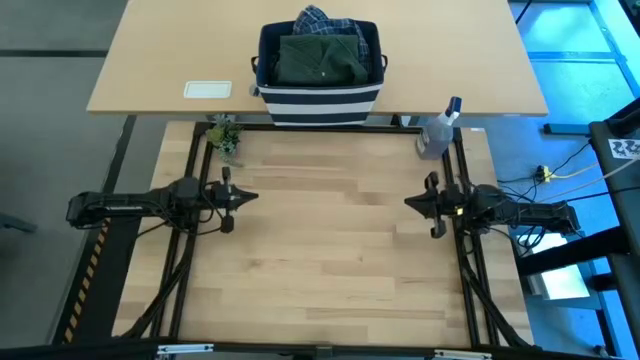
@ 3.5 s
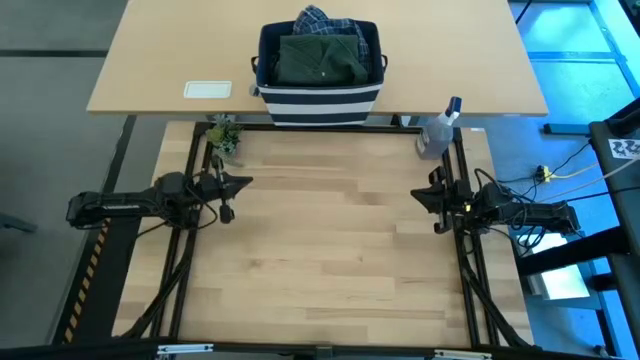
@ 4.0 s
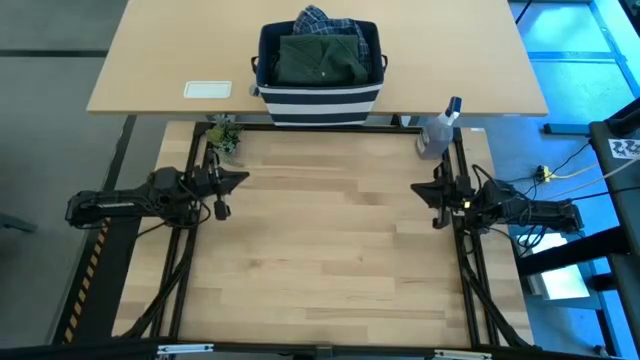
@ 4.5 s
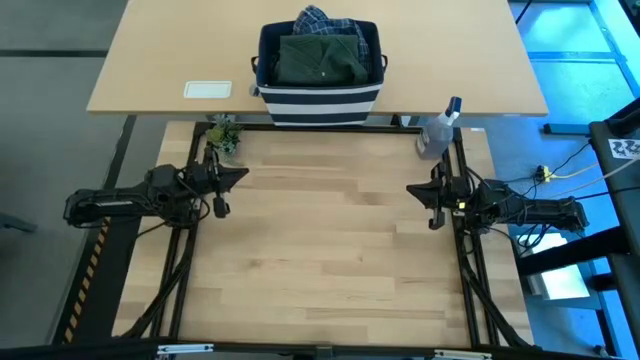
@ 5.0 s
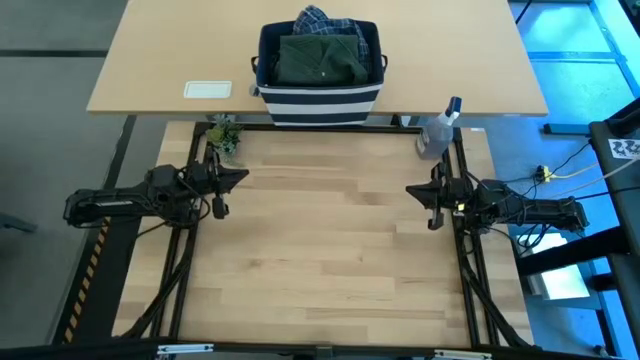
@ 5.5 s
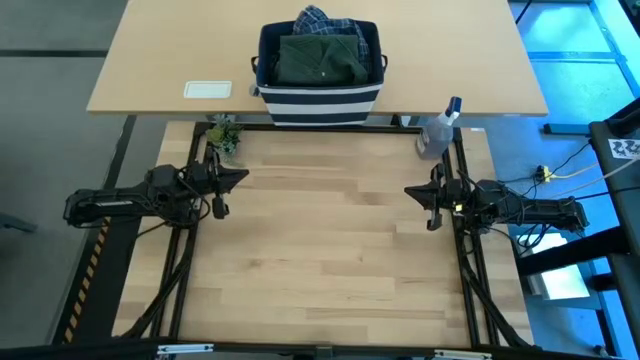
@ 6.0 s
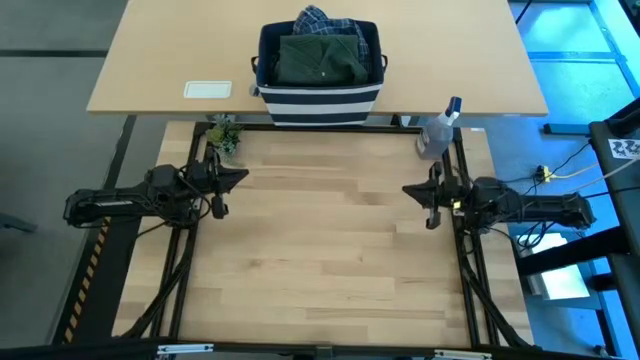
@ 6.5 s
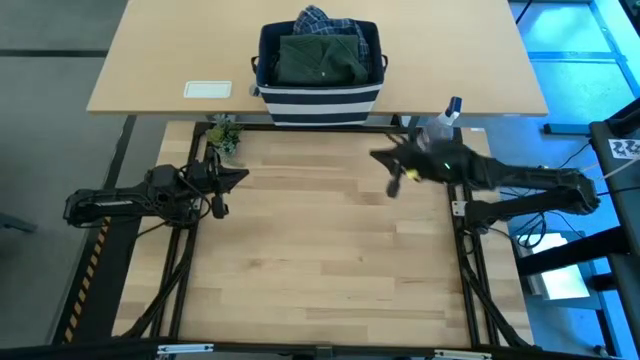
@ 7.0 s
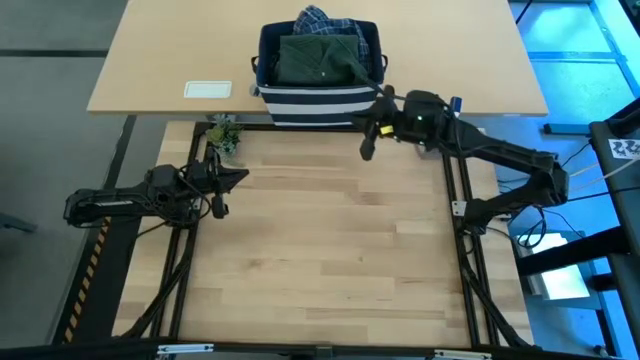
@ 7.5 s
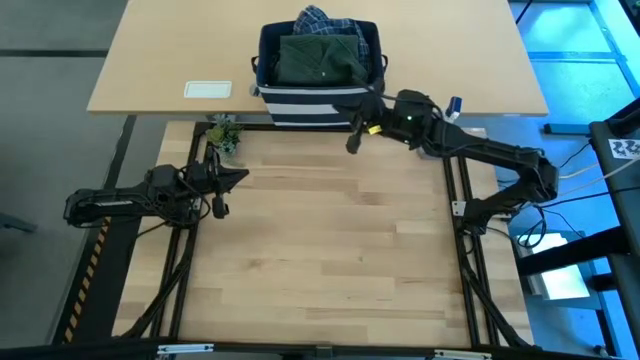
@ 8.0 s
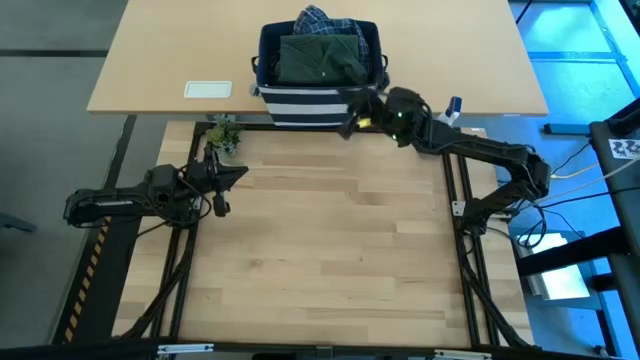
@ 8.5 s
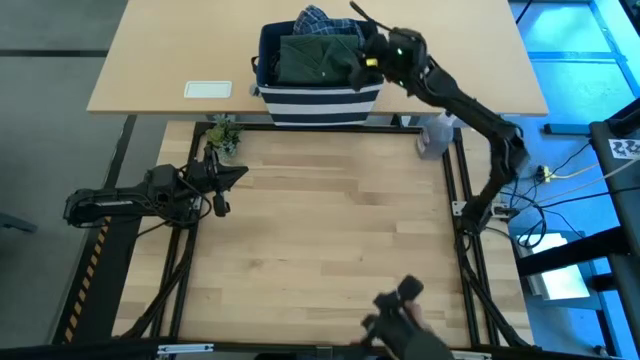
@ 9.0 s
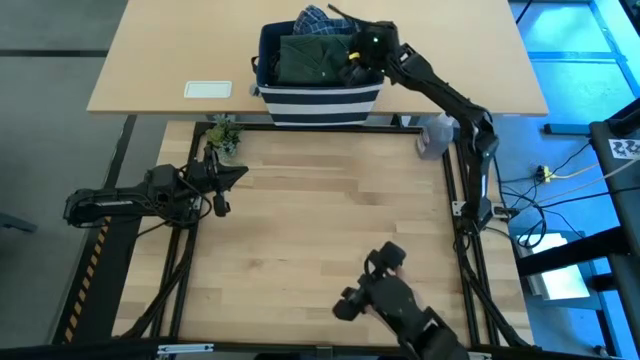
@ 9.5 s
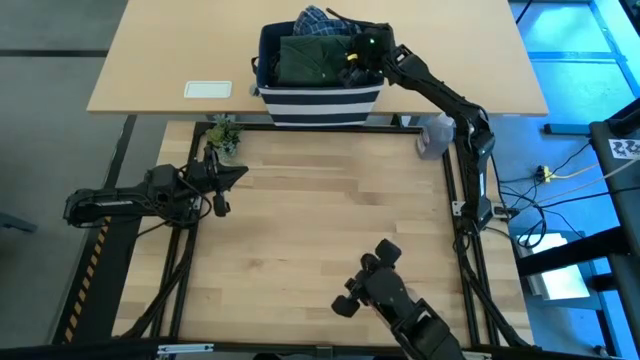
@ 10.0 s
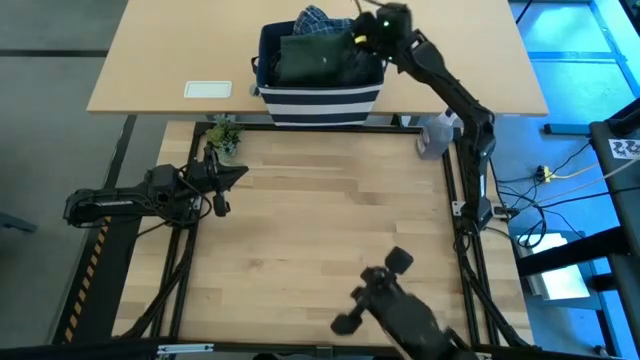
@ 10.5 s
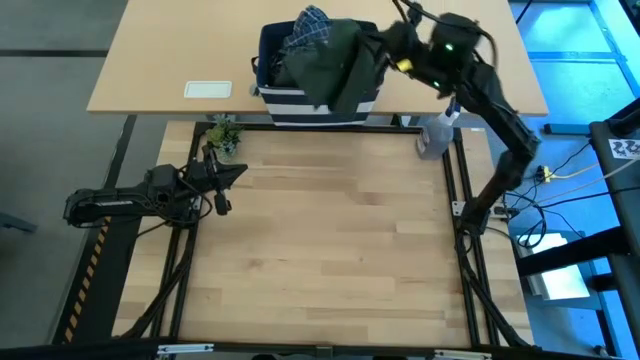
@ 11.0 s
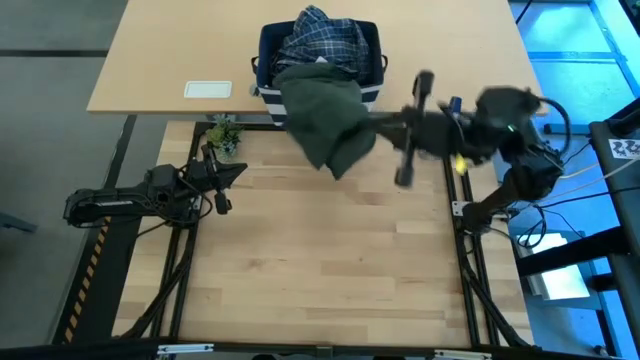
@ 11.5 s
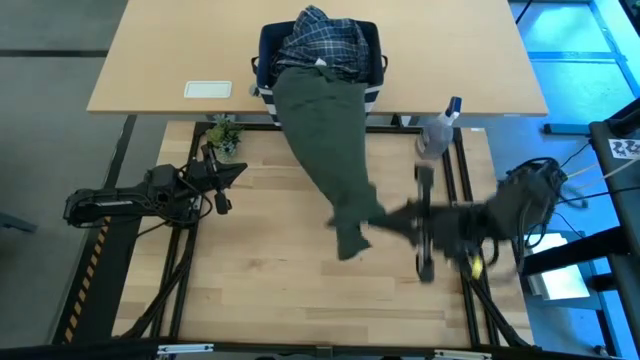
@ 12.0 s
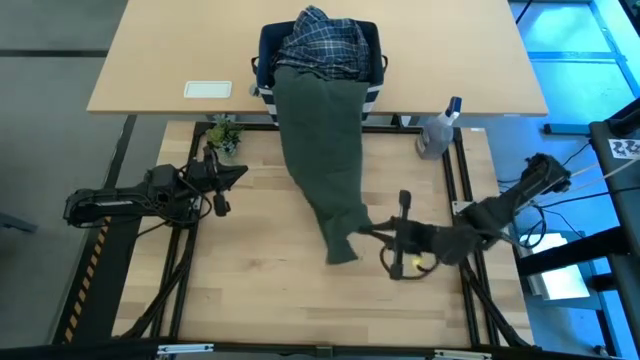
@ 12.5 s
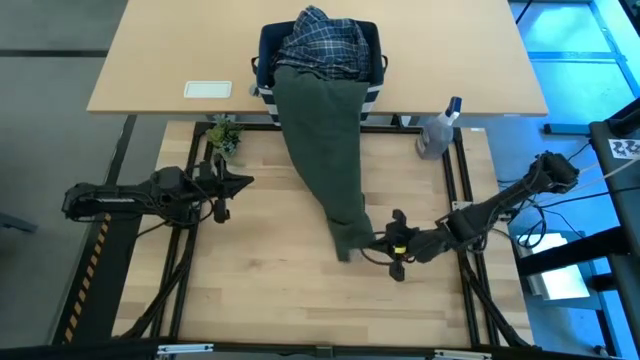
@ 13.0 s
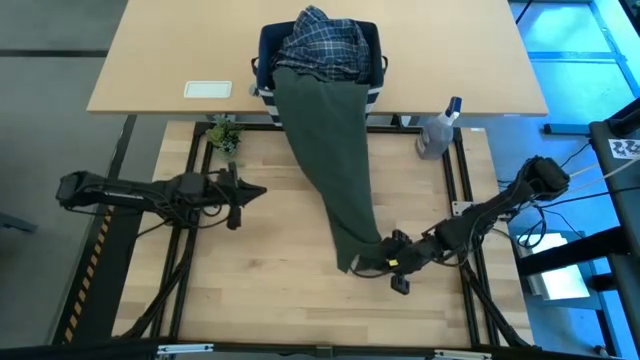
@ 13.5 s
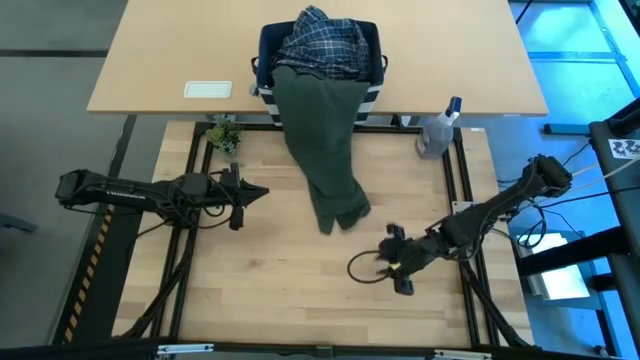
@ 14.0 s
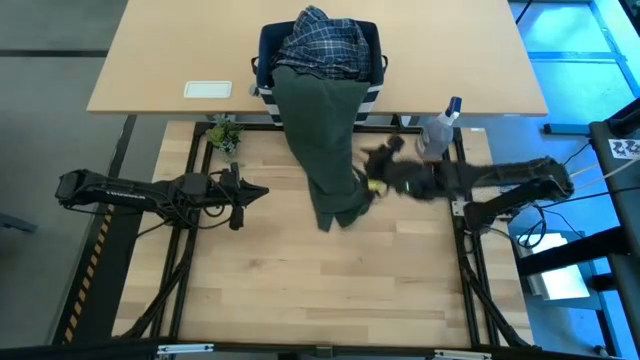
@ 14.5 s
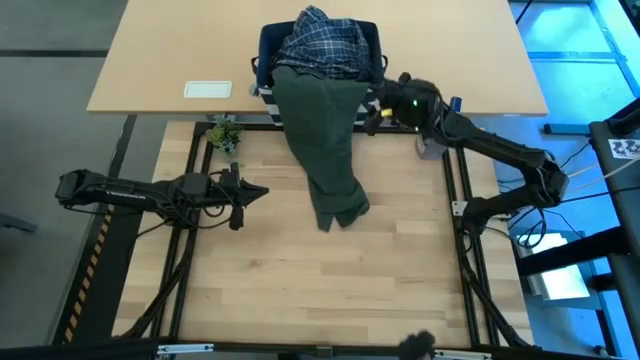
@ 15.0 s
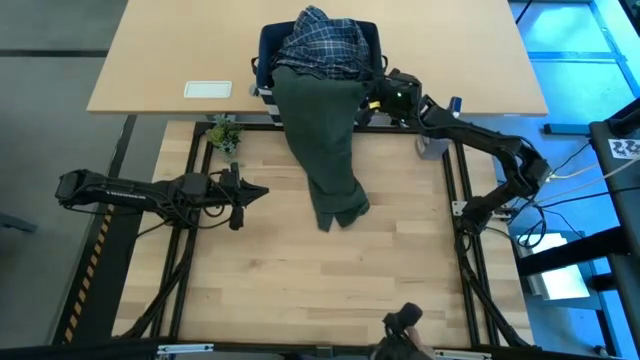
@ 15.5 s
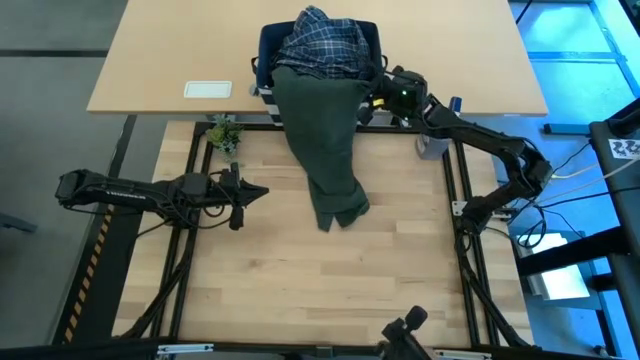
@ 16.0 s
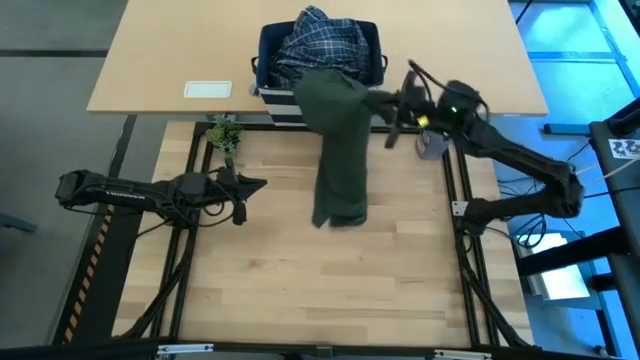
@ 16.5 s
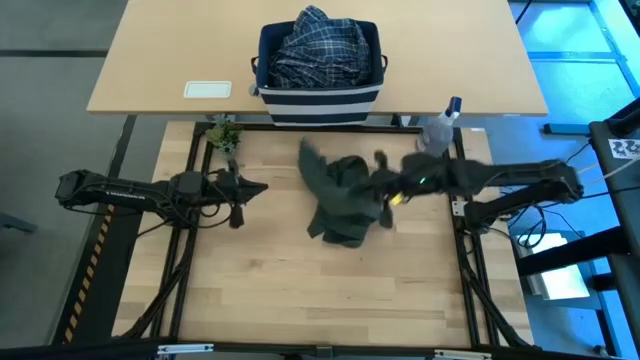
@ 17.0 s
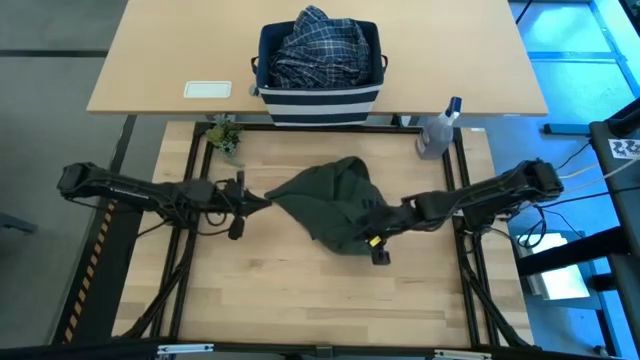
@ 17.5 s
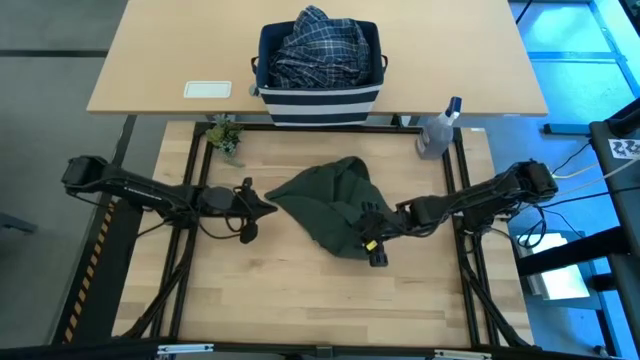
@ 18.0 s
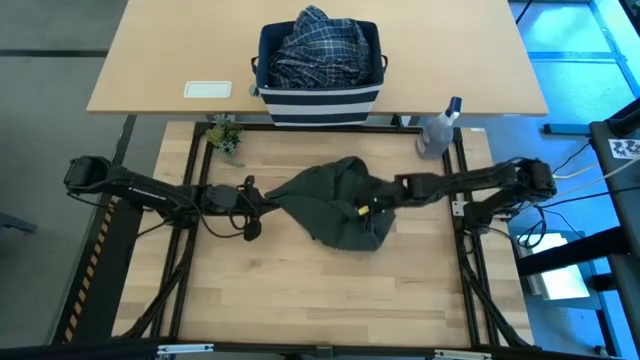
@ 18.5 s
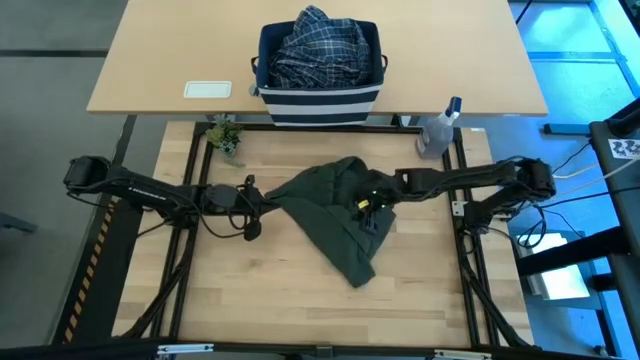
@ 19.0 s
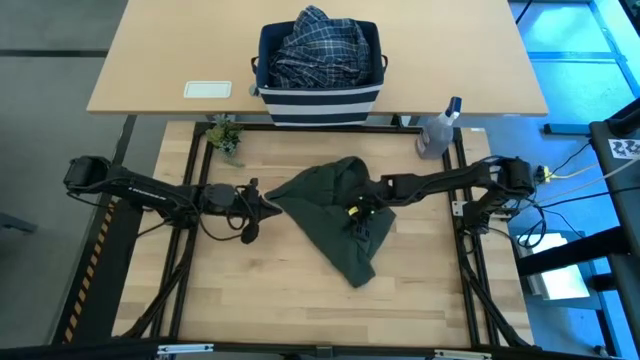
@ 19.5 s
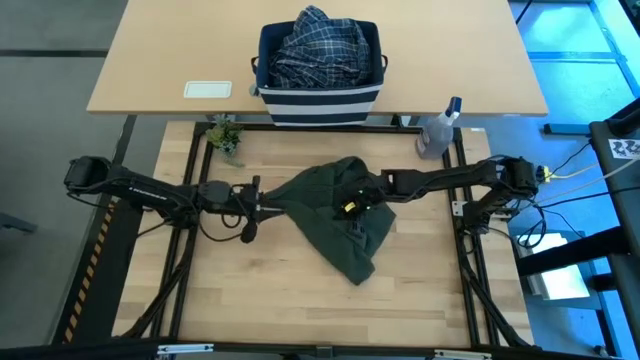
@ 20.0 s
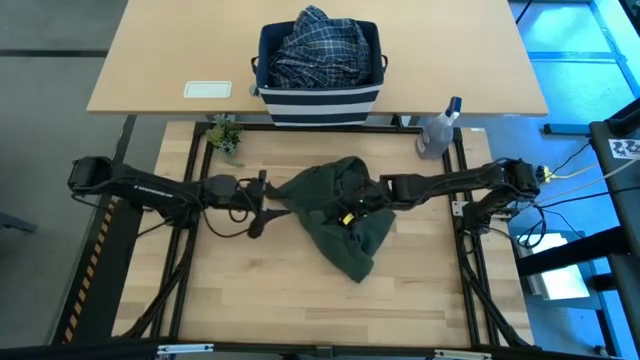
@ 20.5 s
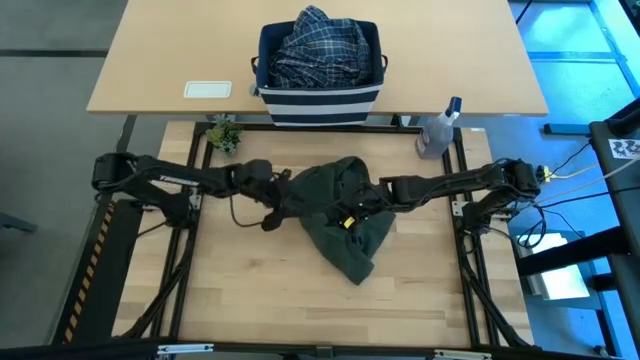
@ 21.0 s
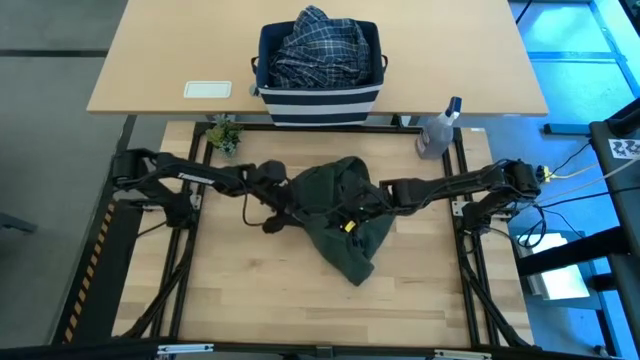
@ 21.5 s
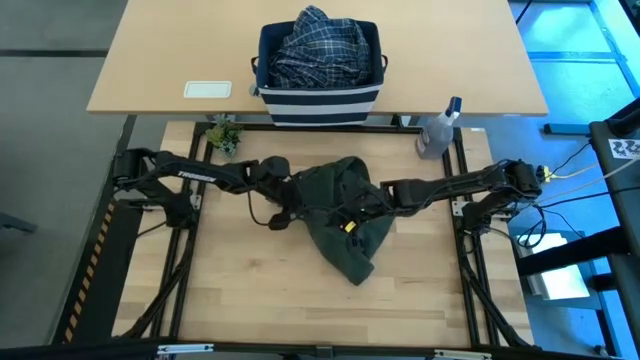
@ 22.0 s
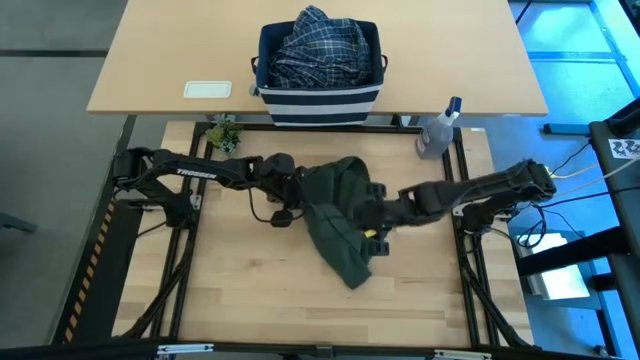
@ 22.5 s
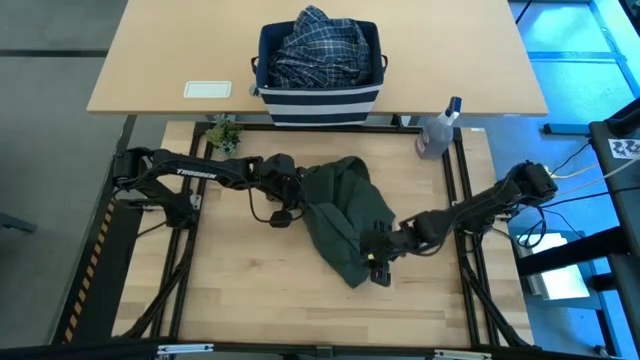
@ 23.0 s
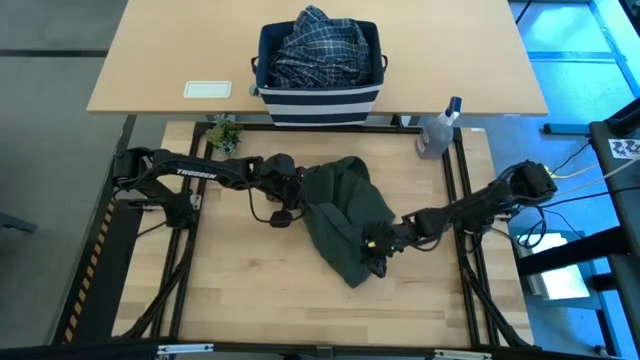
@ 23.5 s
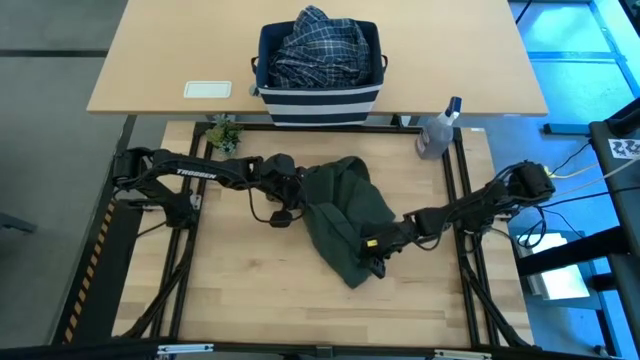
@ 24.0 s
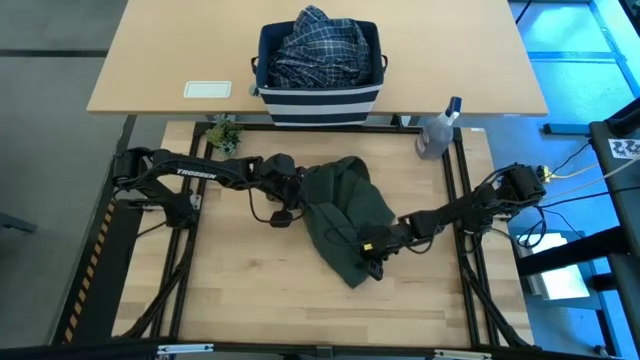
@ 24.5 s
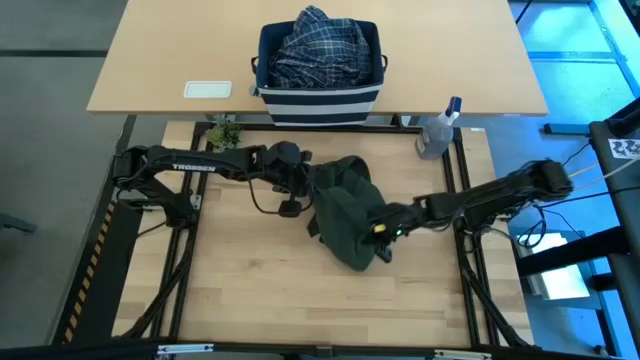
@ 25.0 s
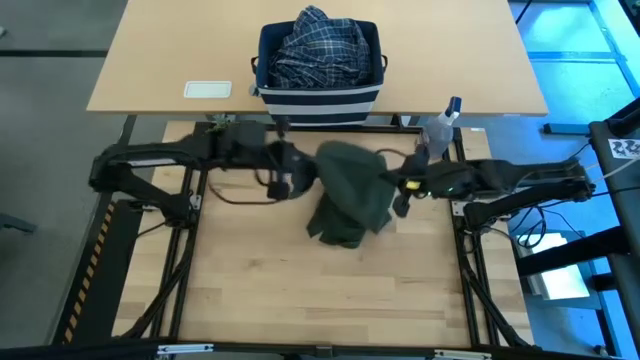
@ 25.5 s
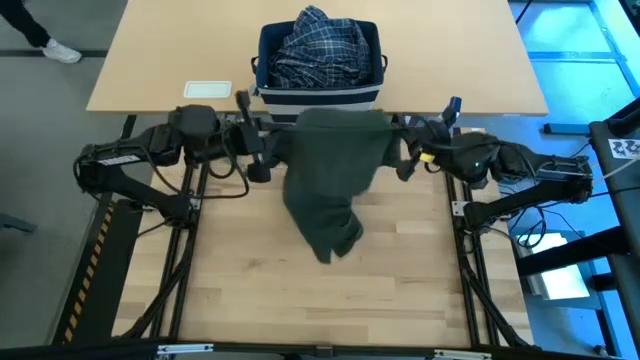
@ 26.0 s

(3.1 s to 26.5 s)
Task: Fold Laundry from Bin
Fold the green polo shirt
